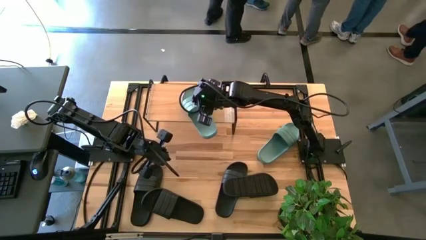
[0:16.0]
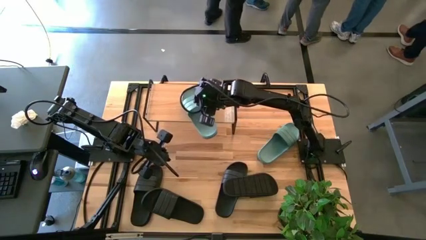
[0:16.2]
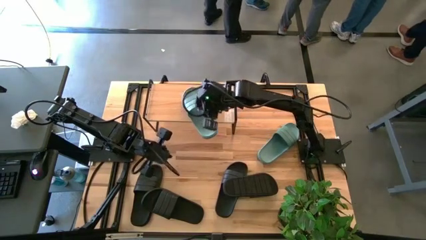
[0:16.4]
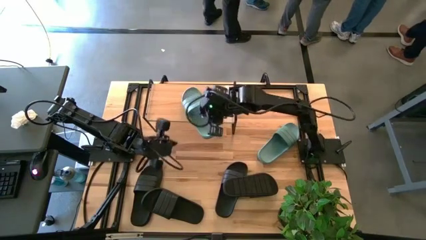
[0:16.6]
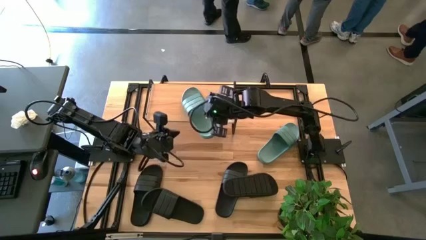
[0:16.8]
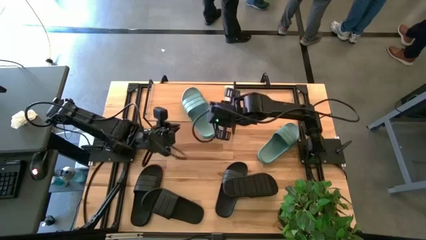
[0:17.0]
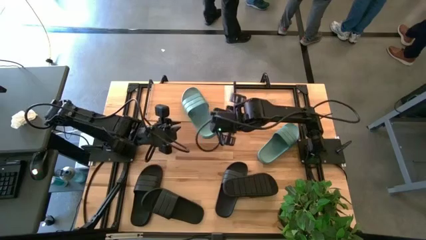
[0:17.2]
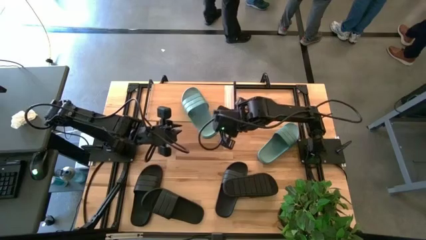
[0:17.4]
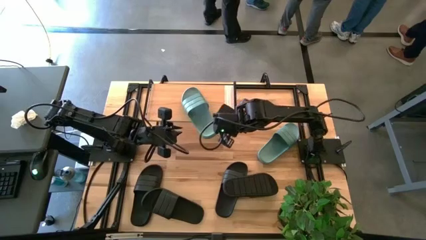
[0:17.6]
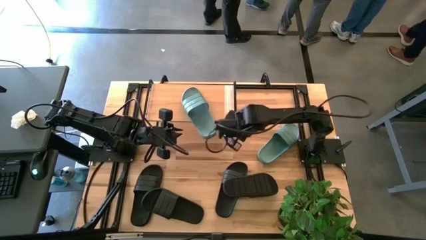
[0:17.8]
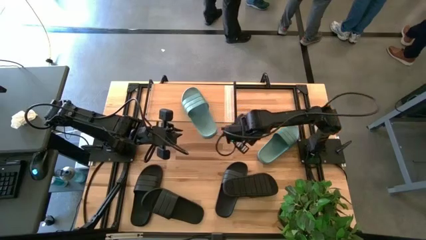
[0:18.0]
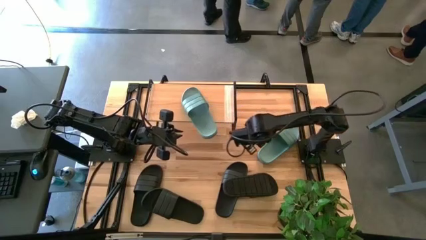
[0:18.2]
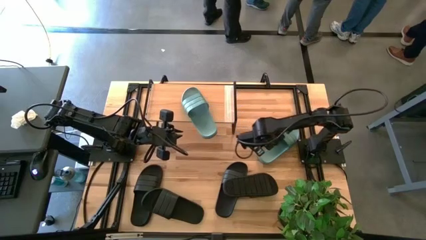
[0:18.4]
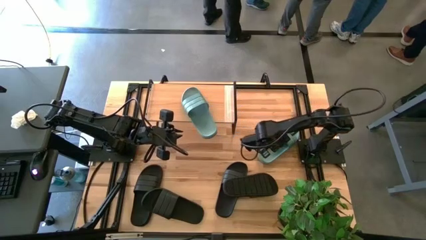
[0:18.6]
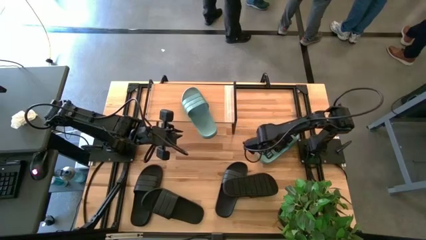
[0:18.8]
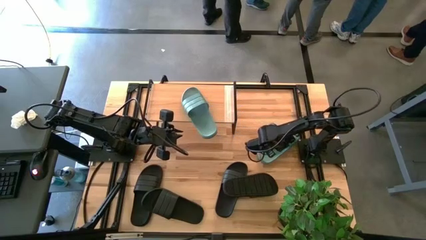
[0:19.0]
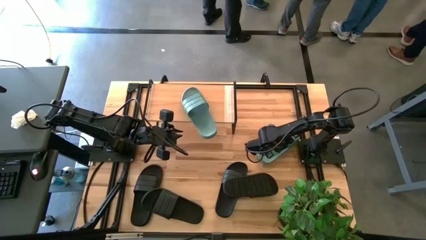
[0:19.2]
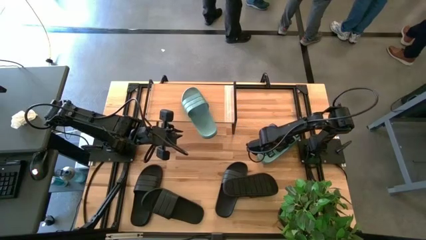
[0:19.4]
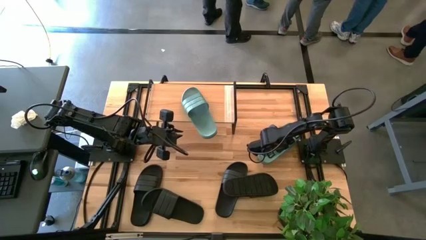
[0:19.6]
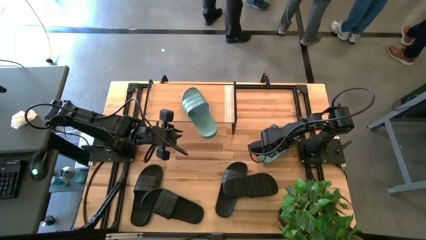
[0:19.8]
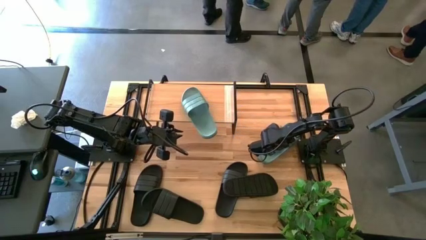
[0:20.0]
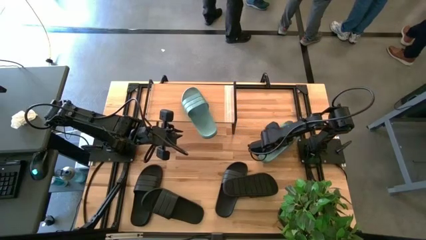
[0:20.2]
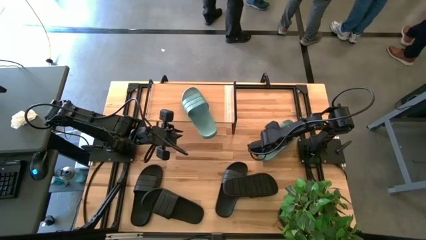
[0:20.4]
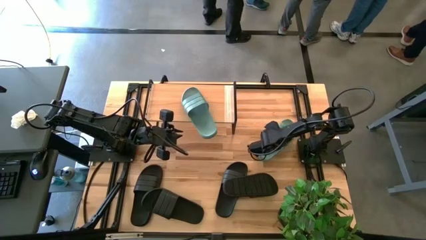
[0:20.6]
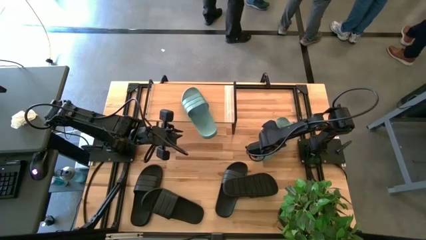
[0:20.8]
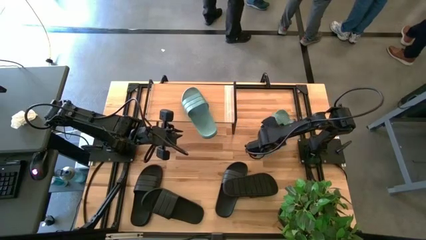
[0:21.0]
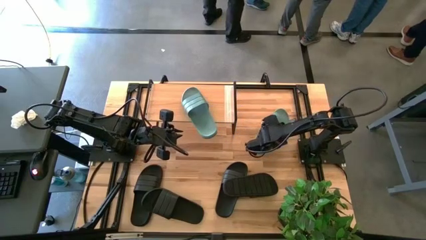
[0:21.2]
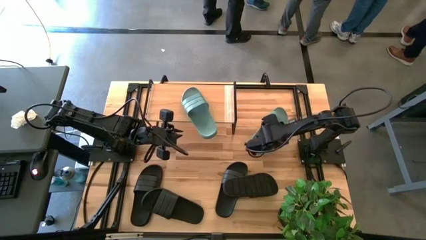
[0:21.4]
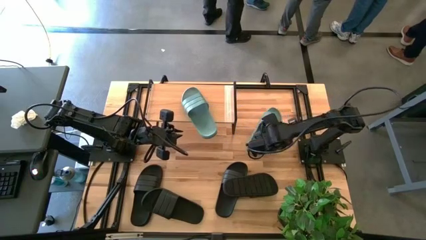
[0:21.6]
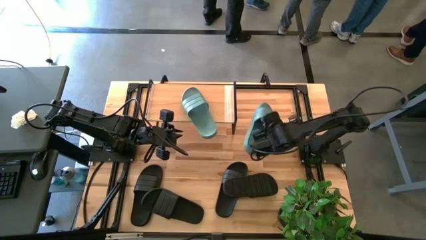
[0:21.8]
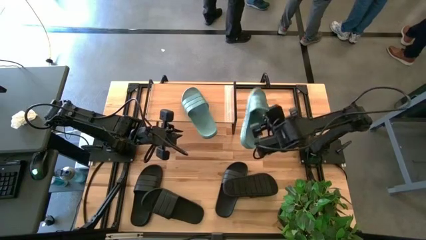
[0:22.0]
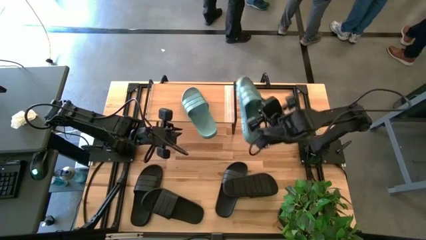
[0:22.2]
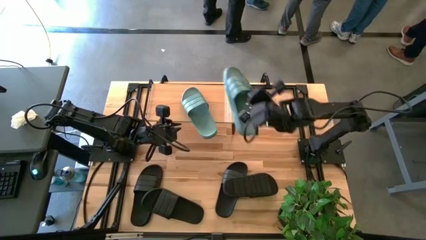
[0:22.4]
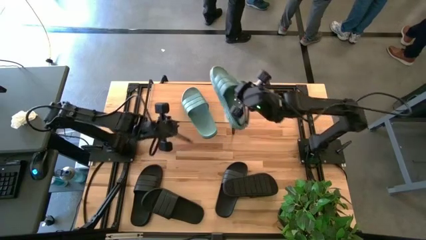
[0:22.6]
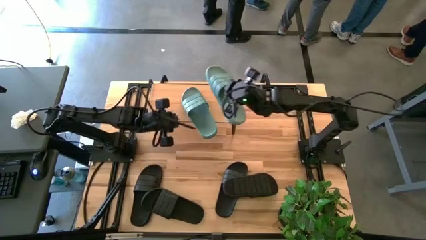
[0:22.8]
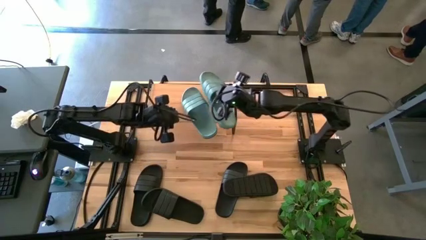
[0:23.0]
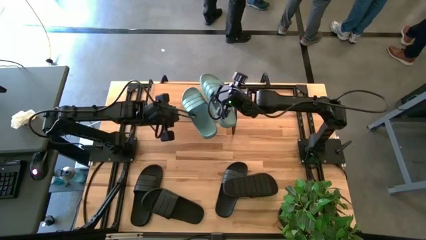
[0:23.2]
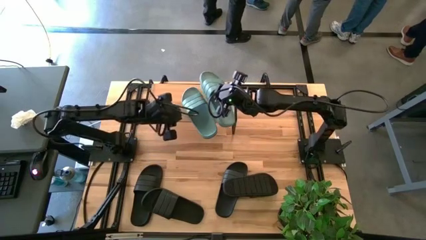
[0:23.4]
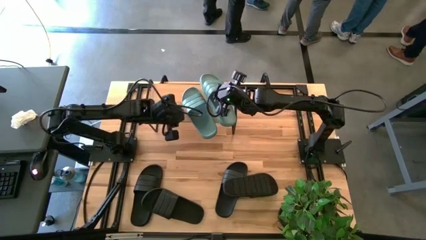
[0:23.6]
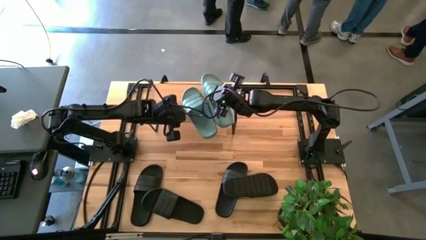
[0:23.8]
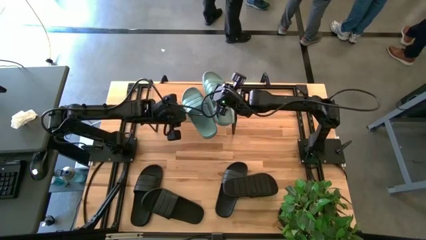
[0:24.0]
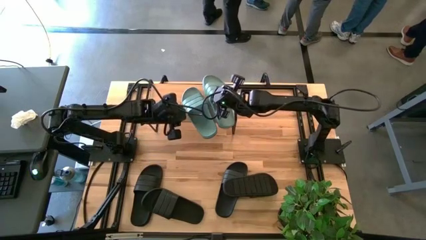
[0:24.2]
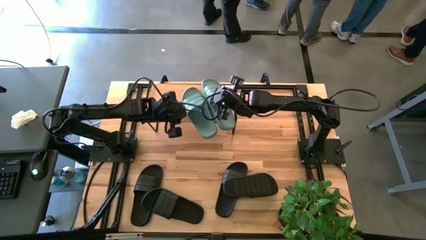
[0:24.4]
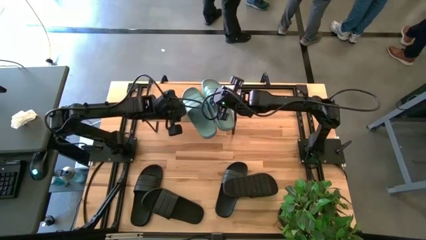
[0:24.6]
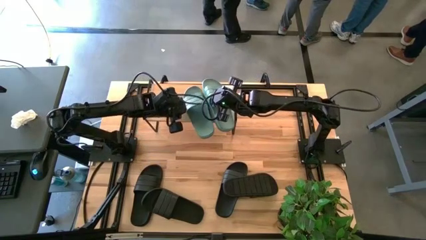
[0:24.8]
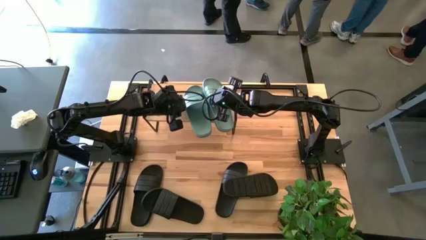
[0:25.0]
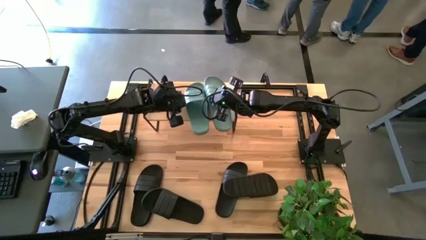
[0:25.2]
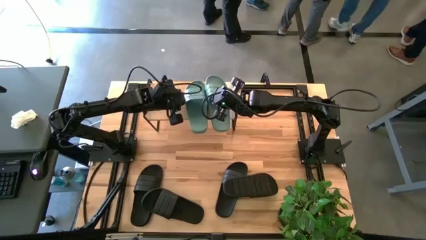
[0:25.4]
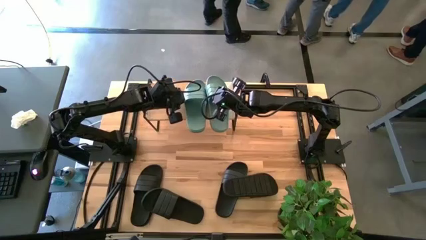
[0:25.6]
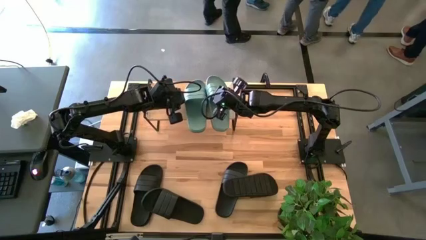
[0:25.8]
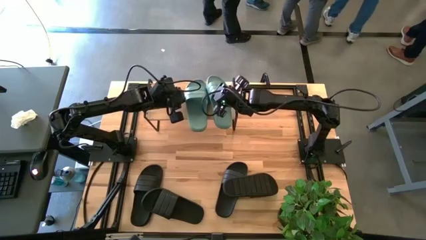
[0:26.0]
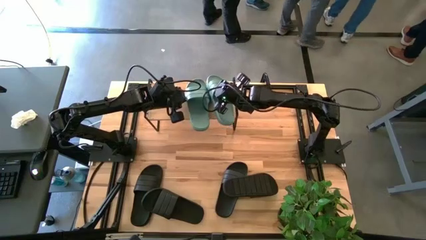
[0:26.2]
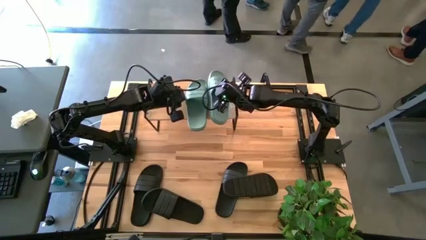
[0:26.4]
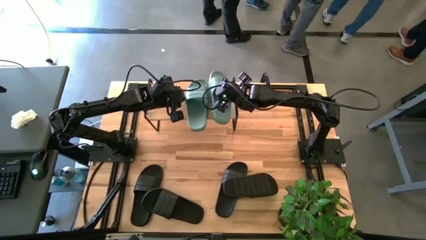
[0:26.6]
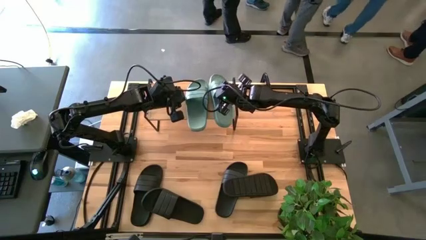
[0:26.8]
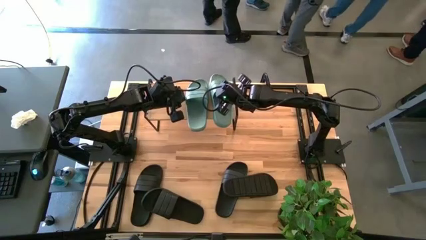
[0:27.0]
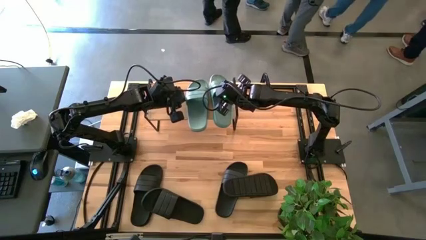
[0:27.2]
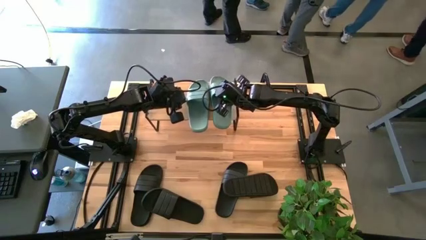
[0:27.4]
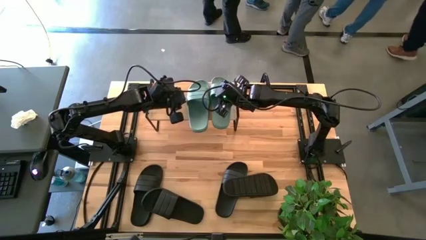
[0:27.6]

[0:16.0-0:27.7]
Task: Pick and place slides into the shelf
Put the blue slide on the shelf
